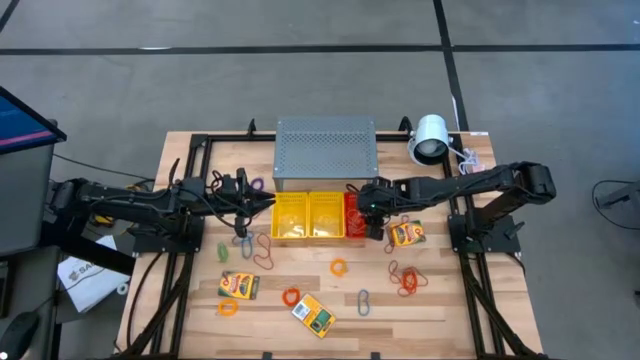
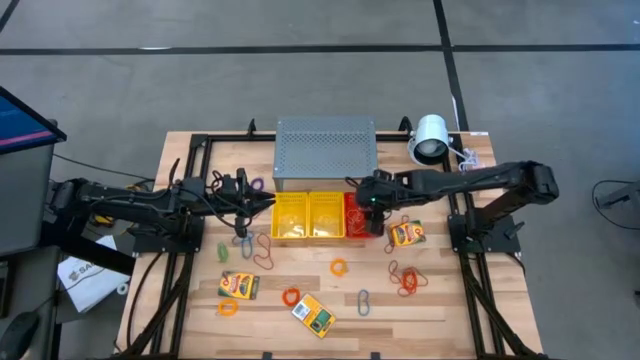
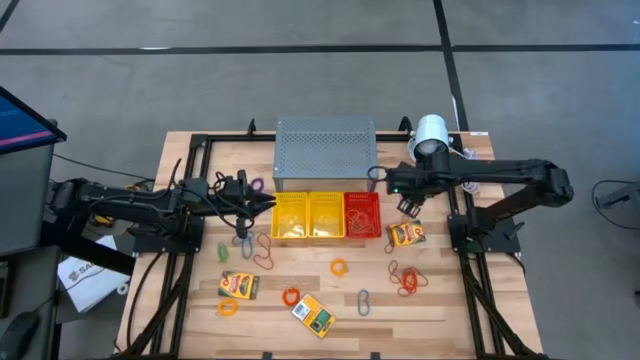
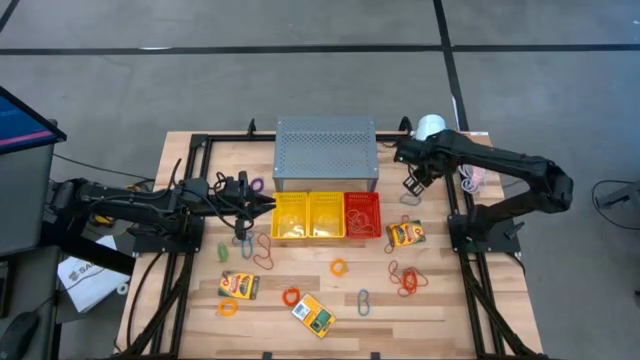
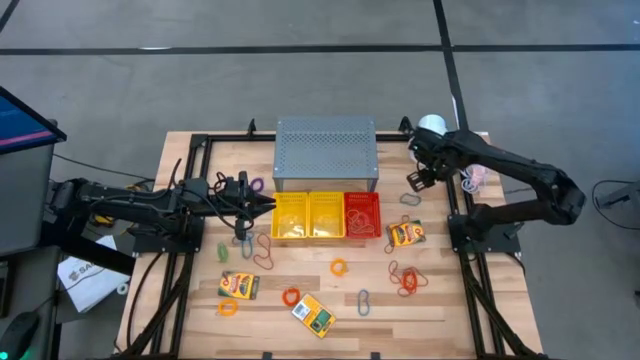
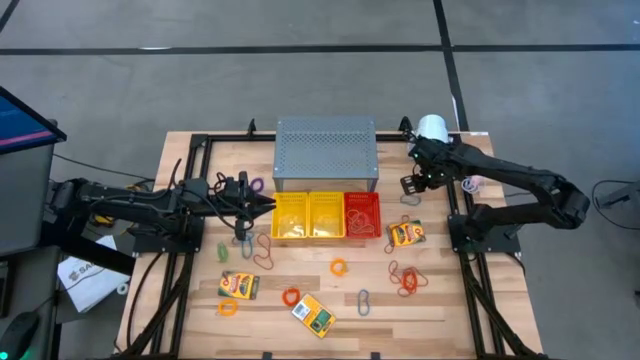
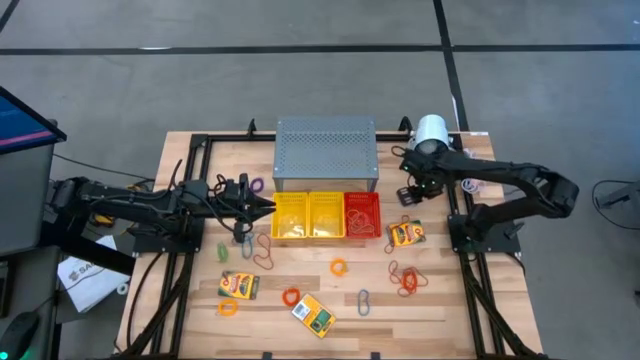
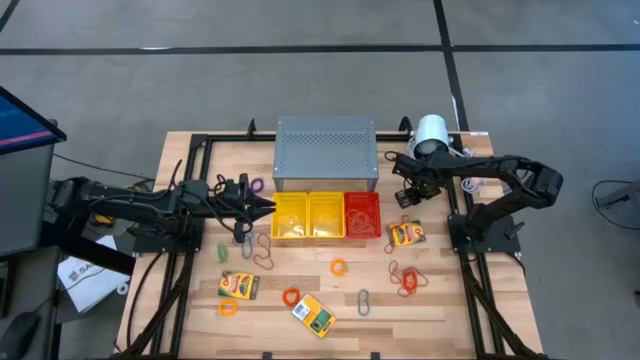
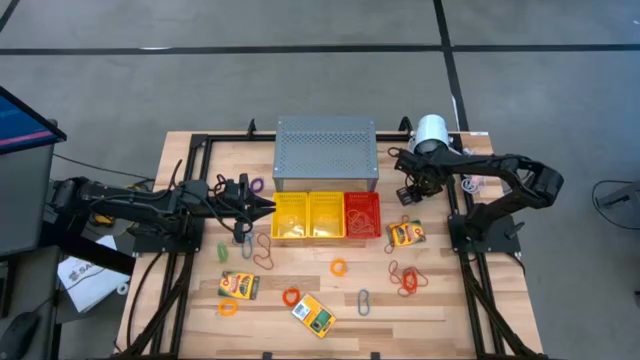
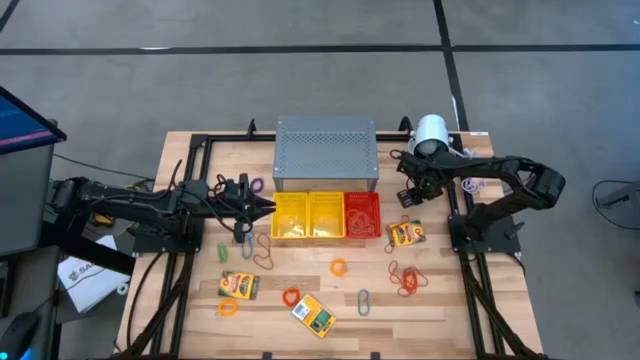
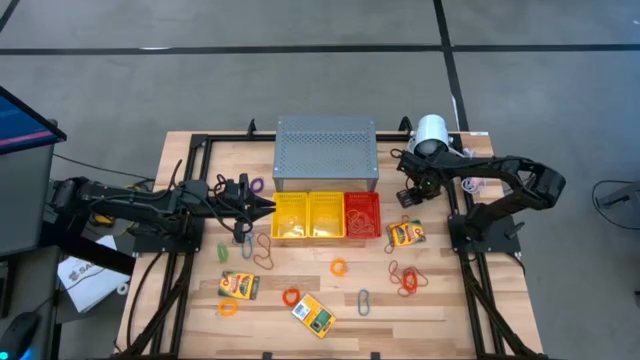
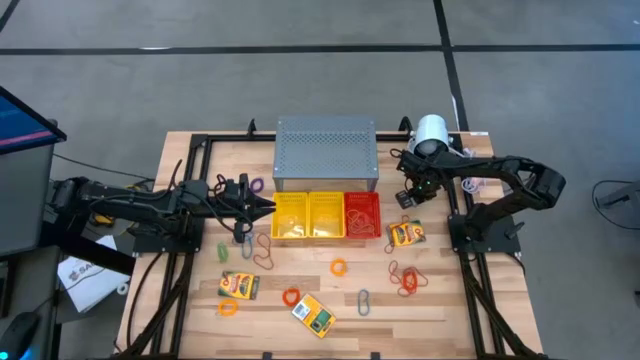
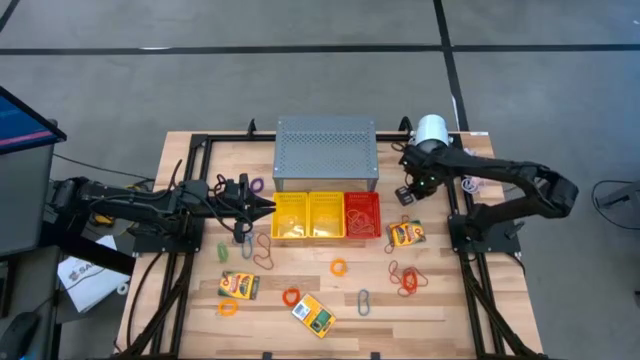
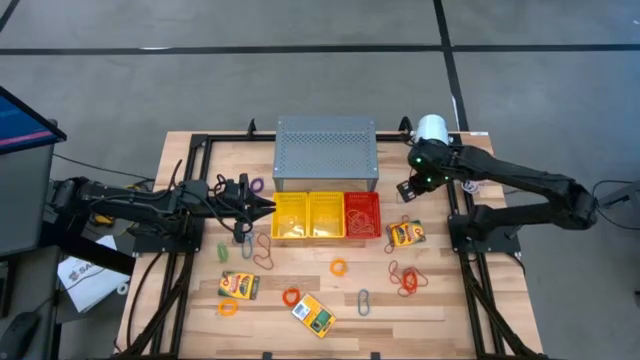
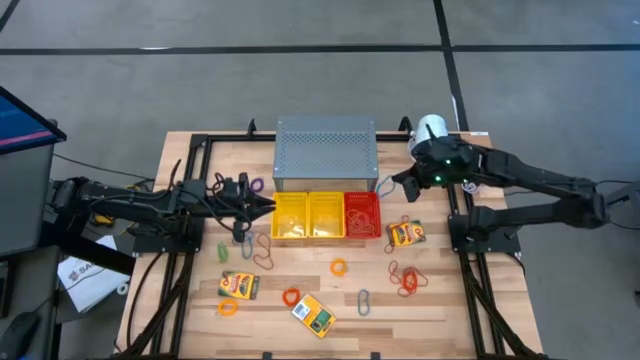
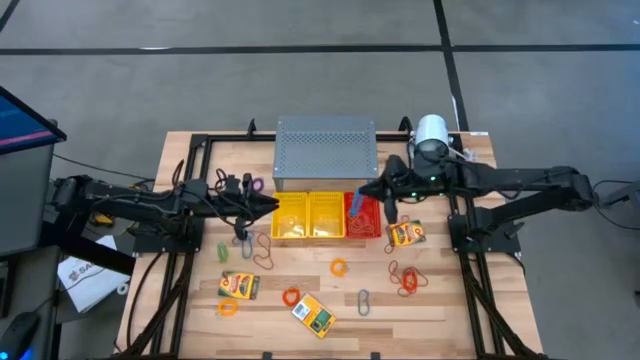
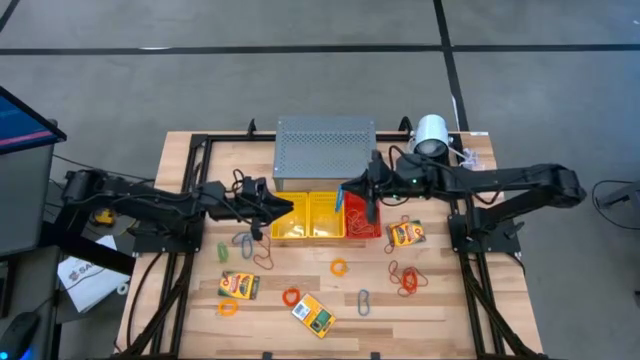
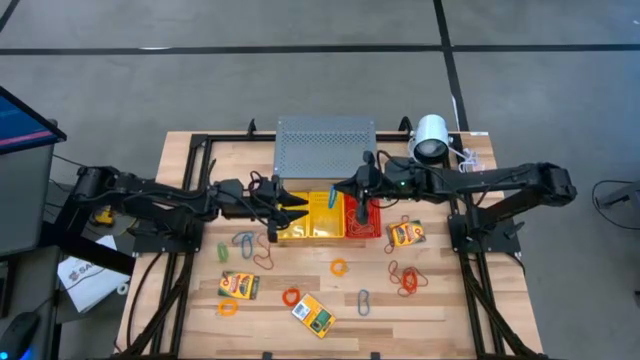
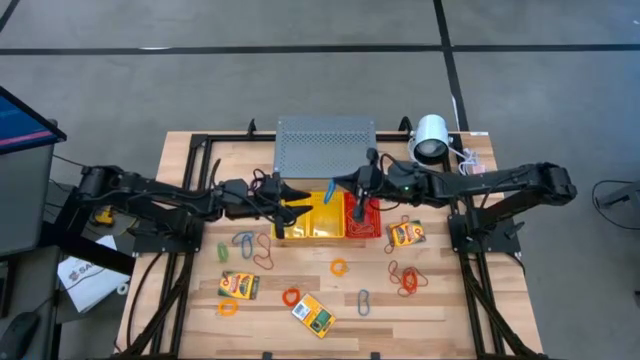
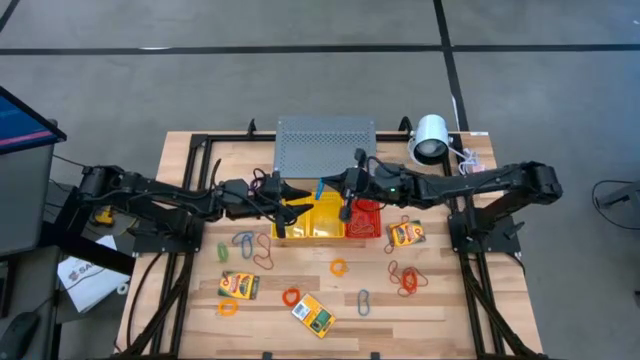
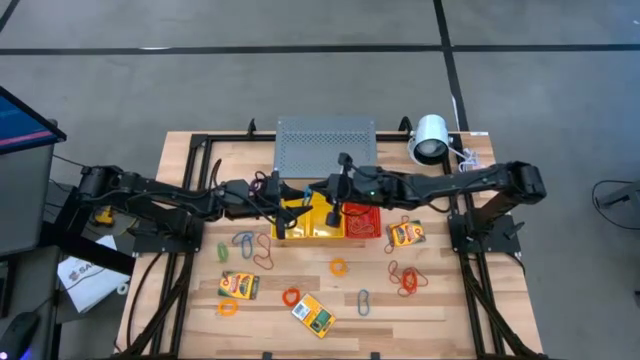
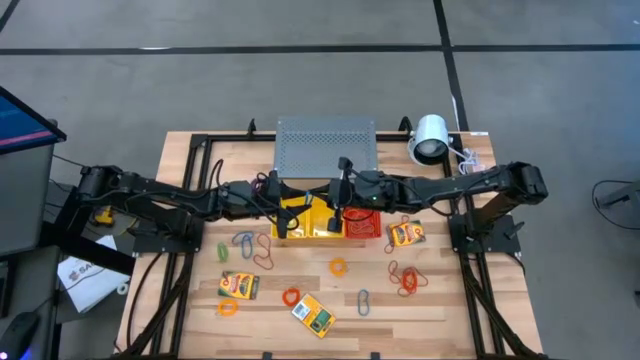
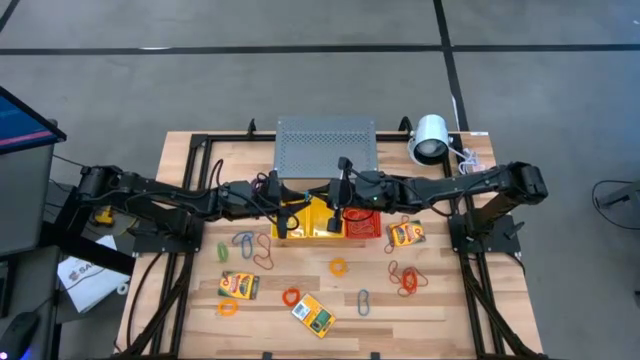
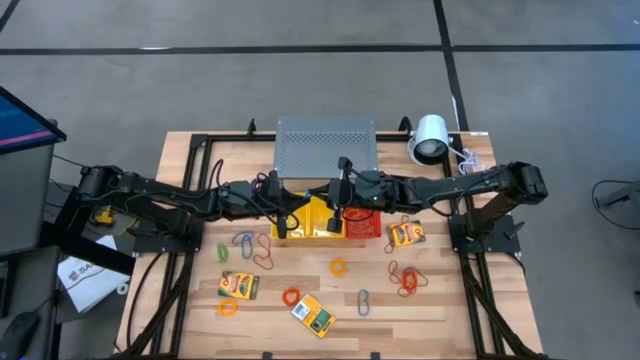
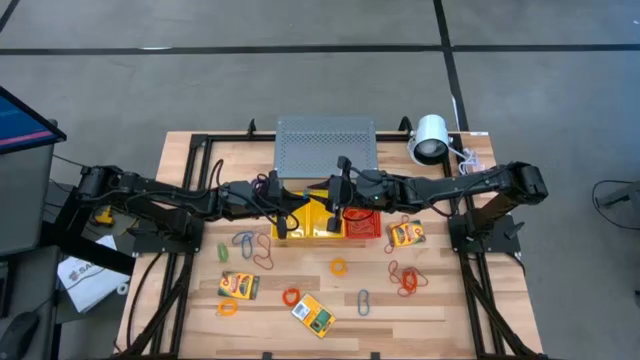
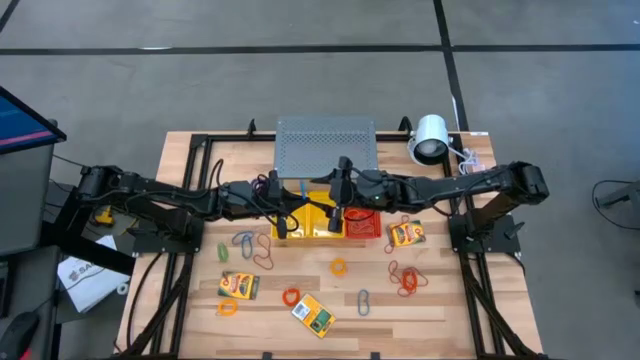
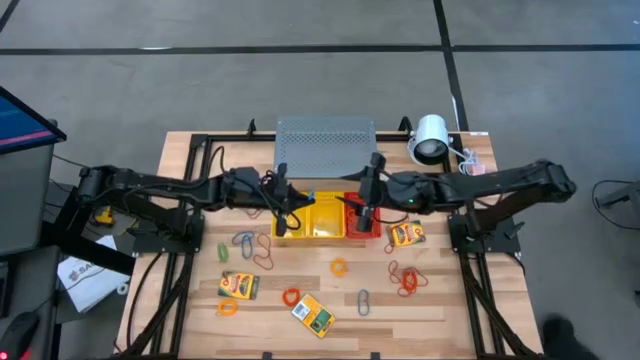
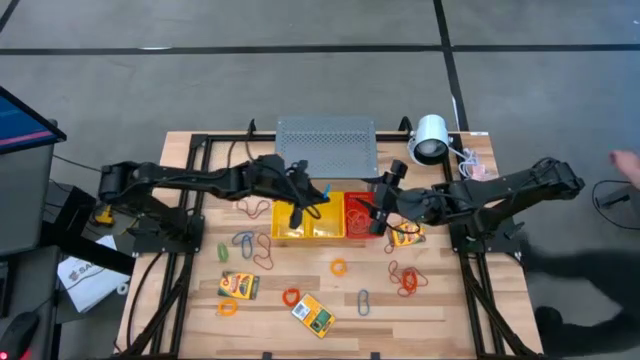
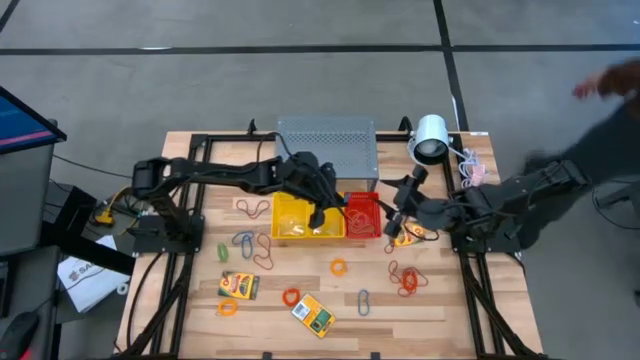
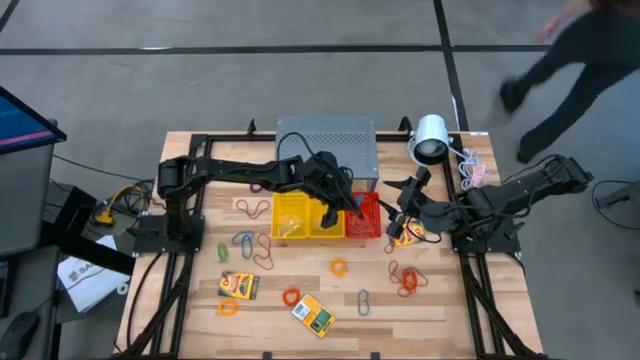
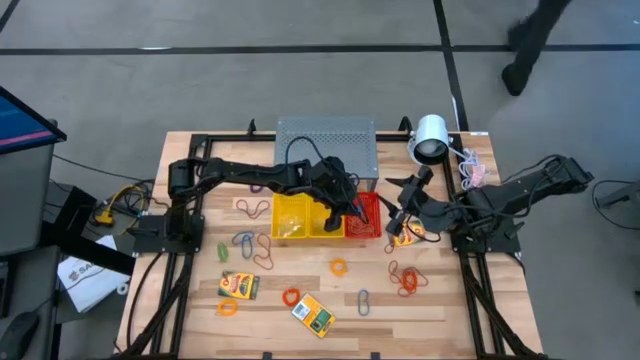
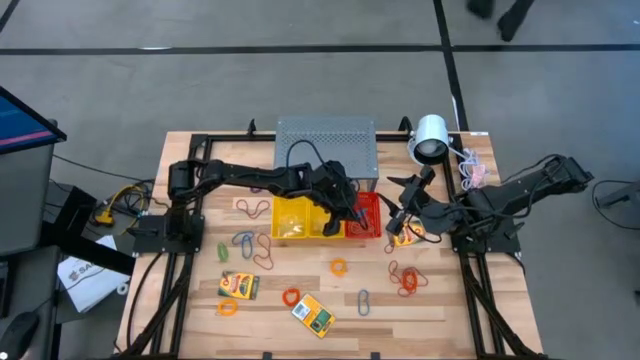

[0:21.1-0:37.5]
Task: Pick & Place Office Desk Supplies
Put the blue rubber band into the red bin

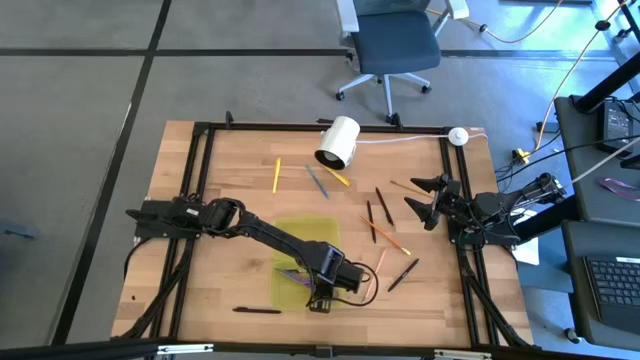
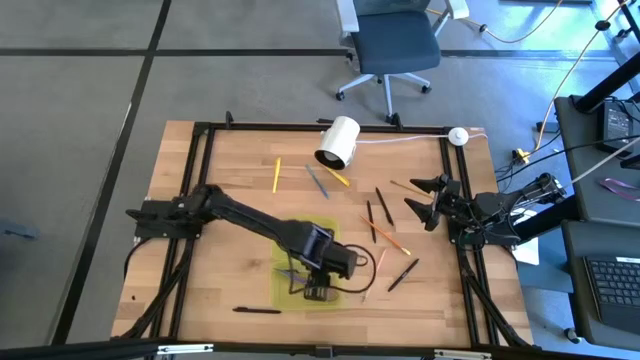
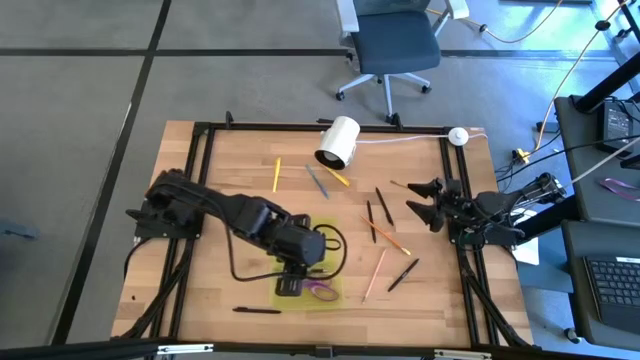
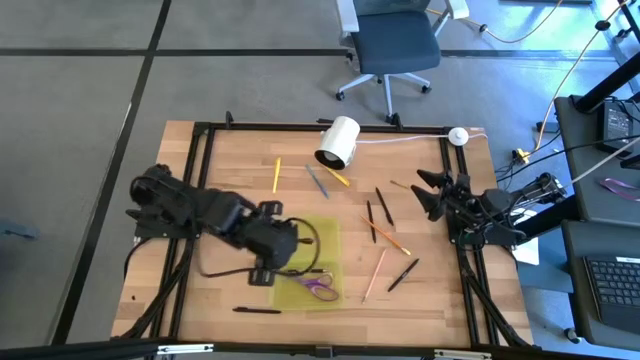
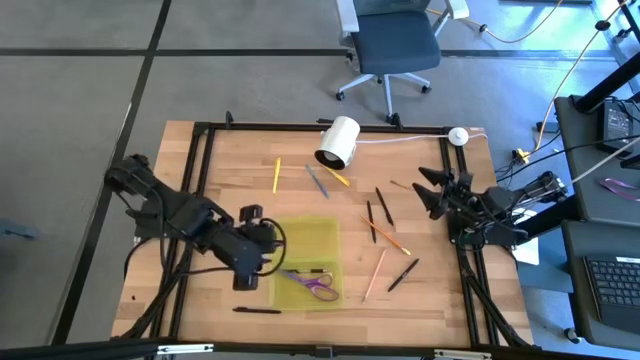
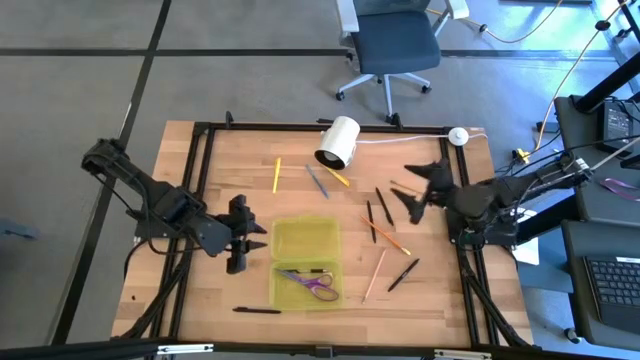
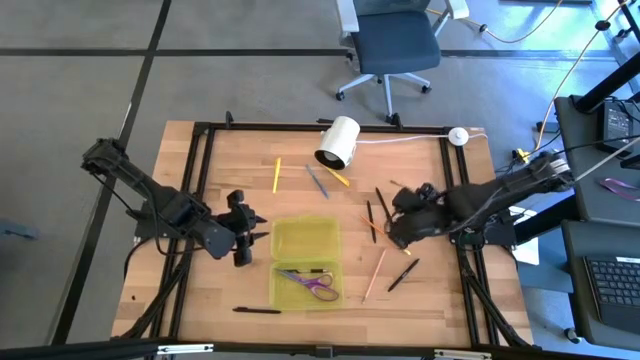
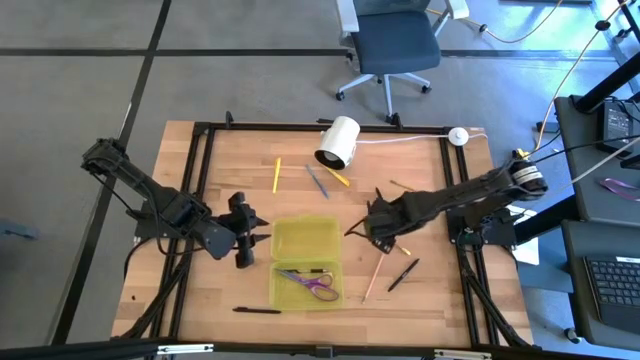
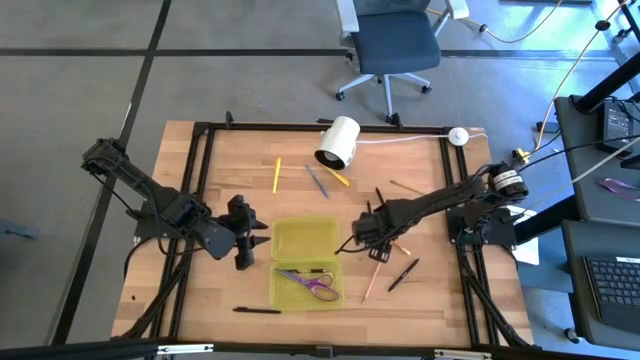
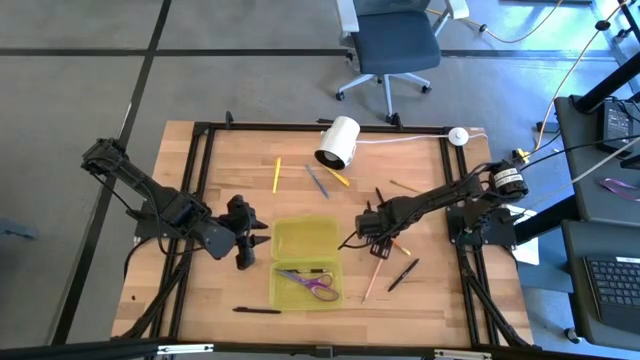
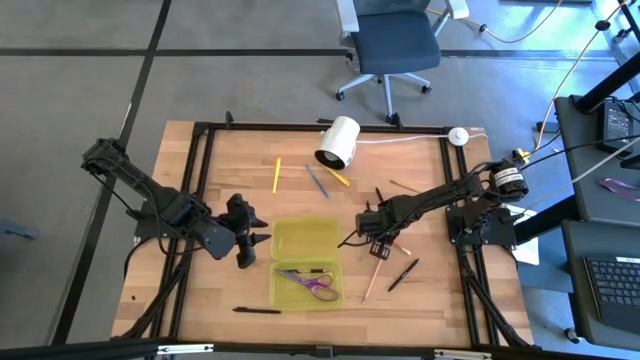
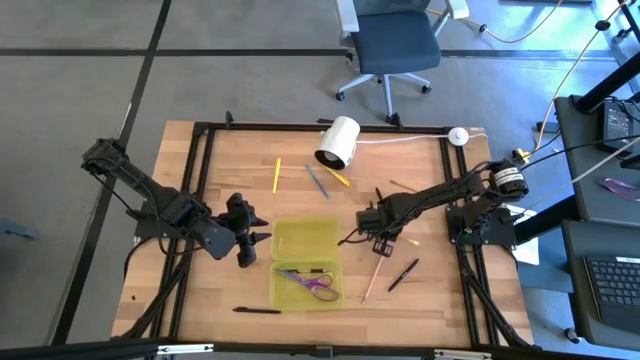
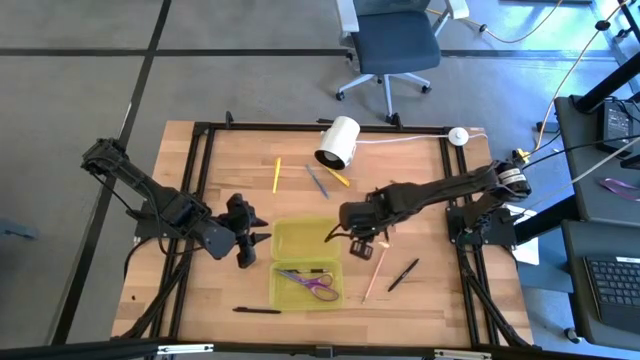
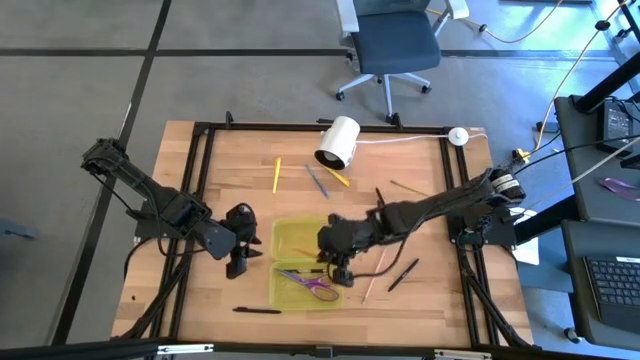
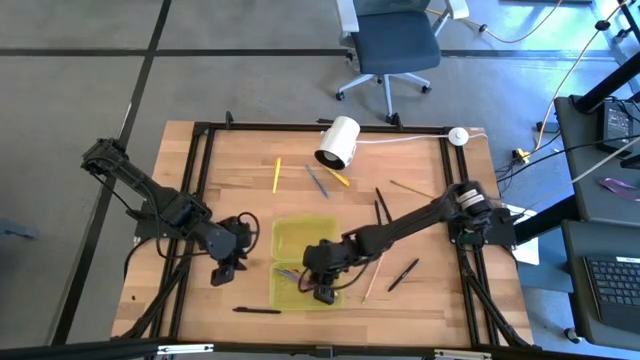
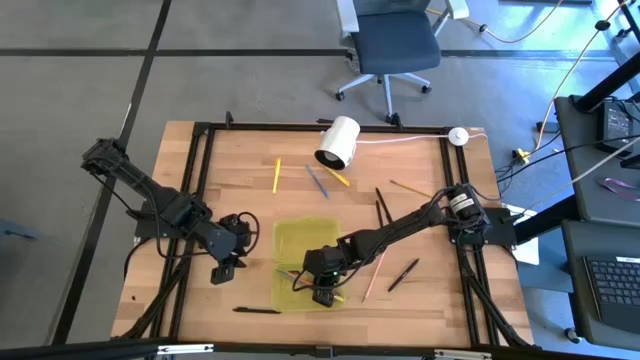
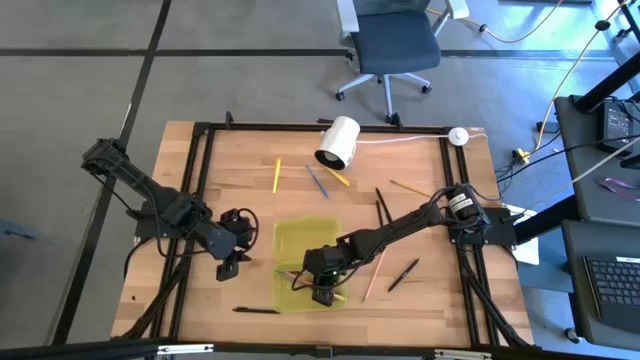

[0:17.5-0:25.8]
Task: Pick & place school supplies into a supply box
Put the orange pencil into the yellow supply box
